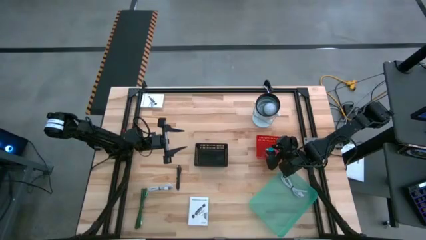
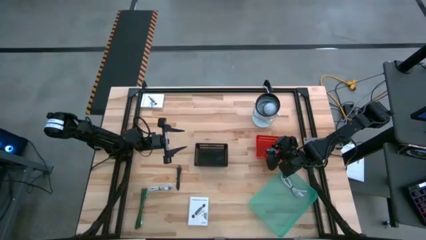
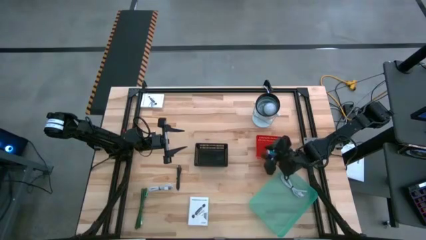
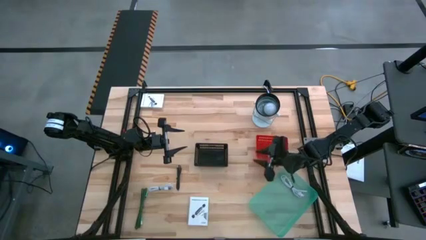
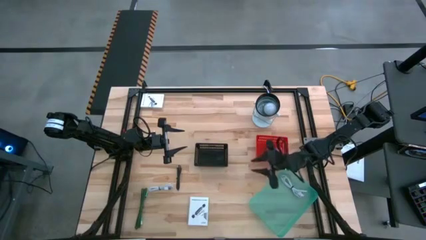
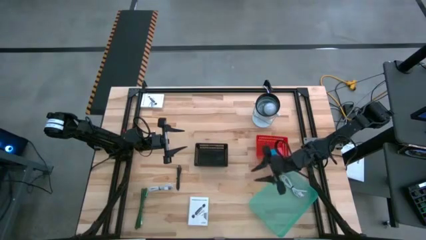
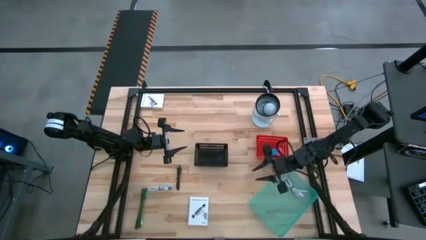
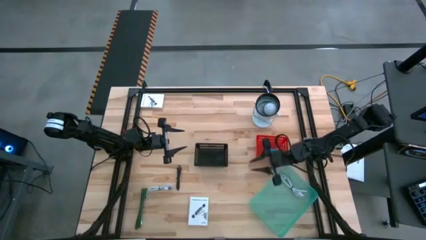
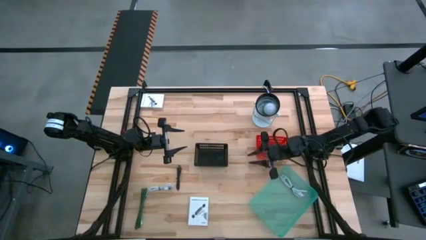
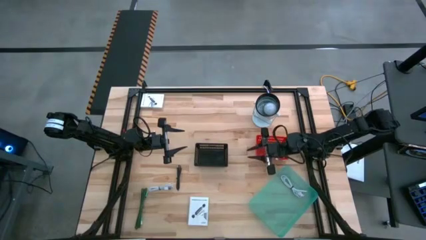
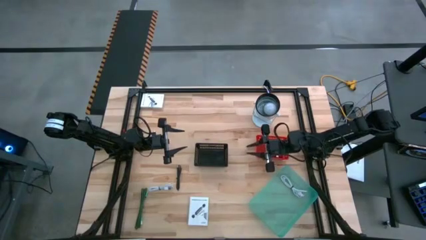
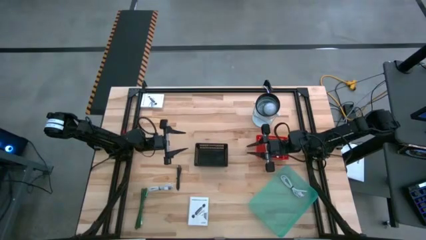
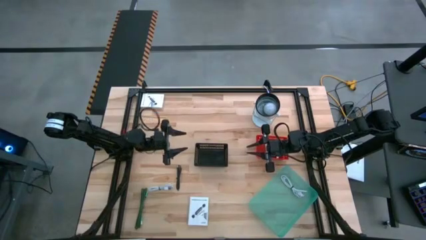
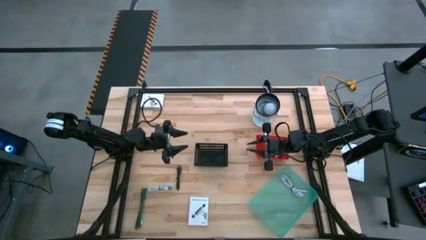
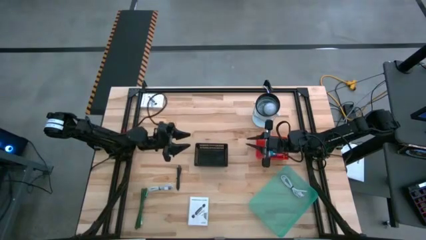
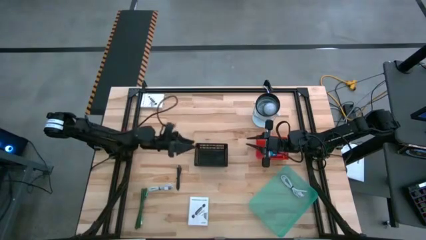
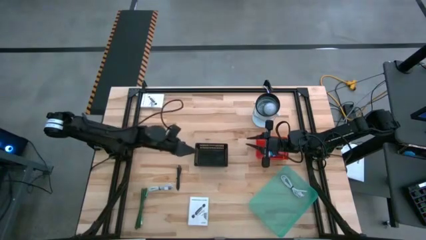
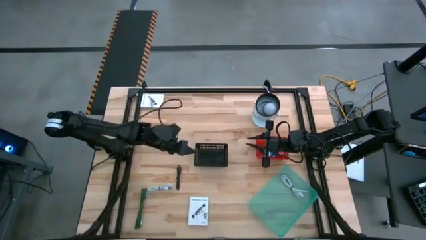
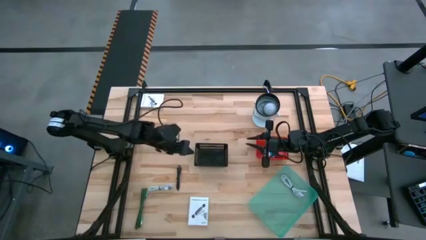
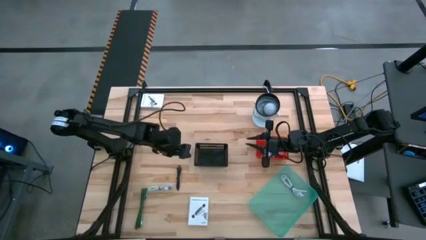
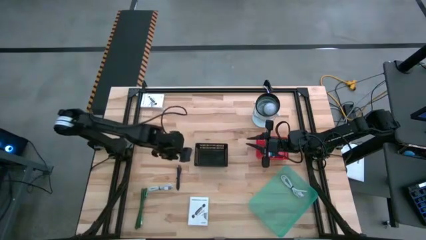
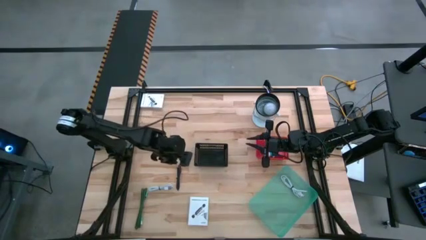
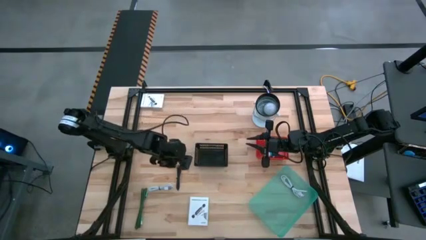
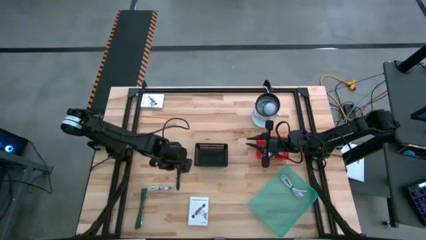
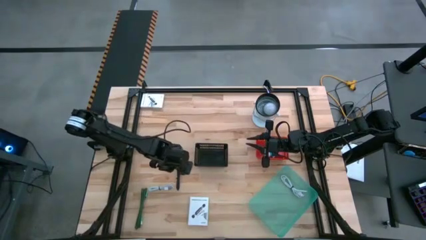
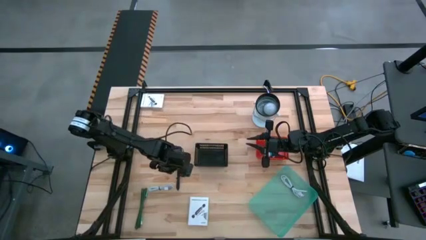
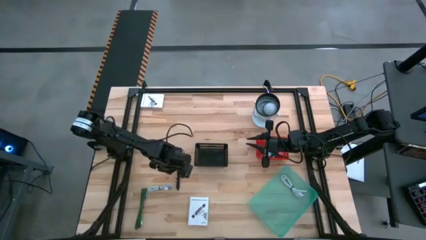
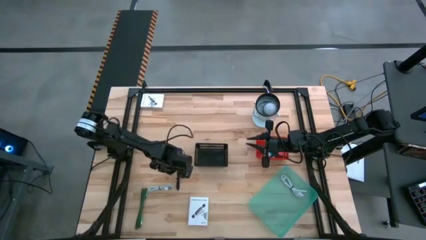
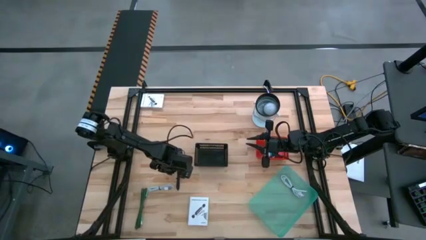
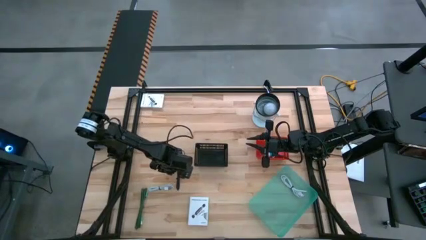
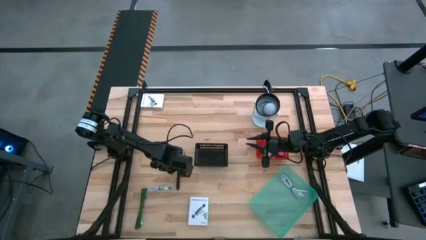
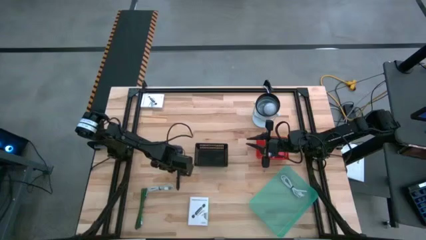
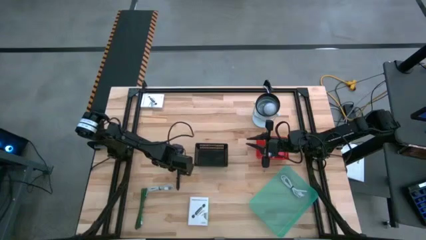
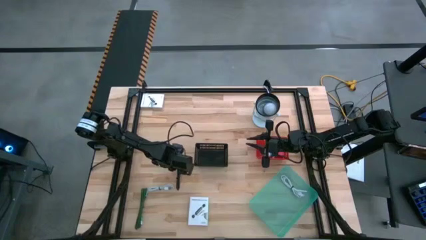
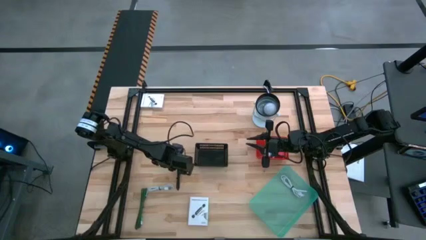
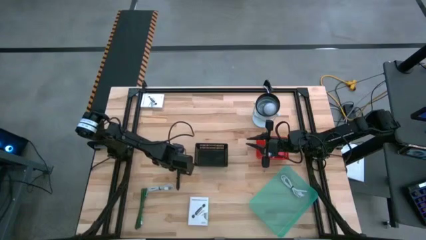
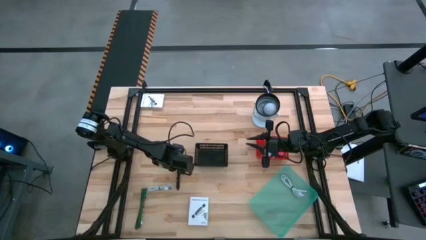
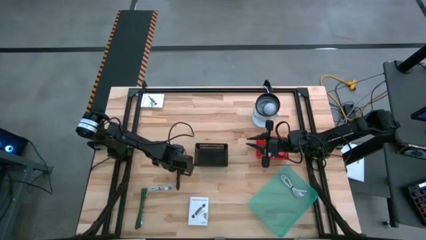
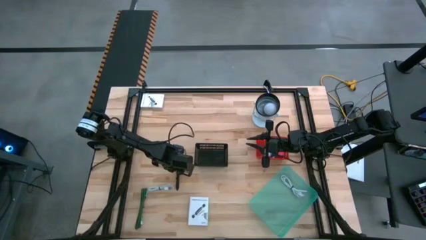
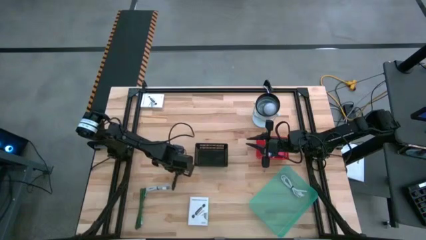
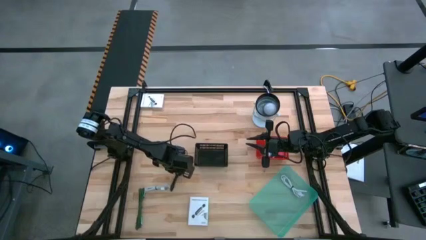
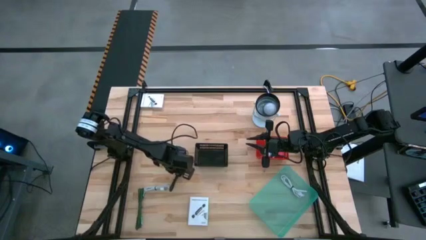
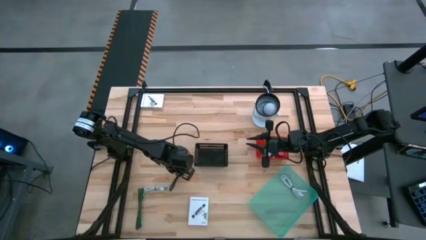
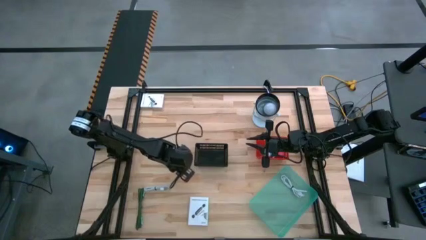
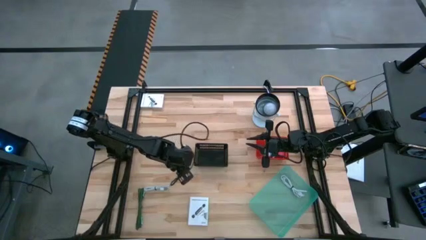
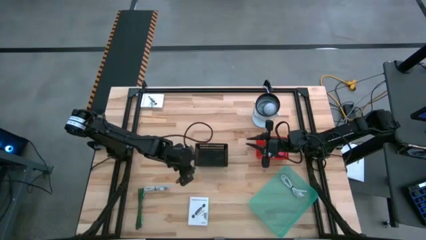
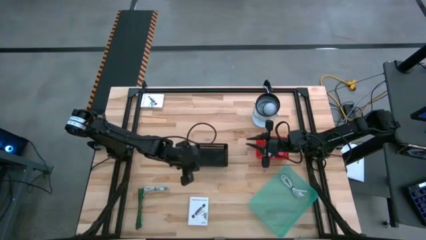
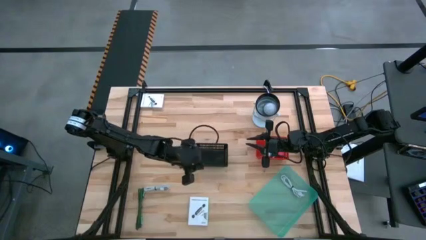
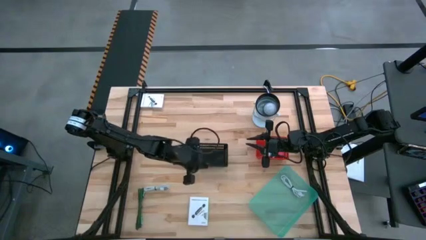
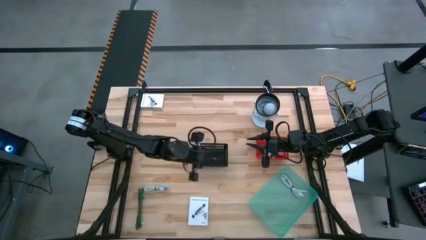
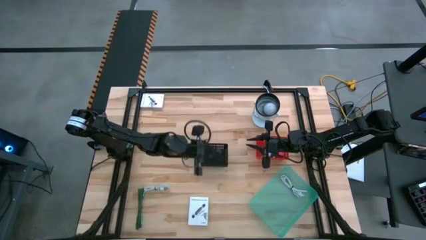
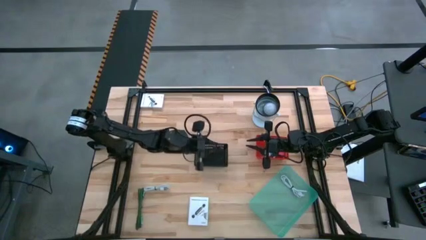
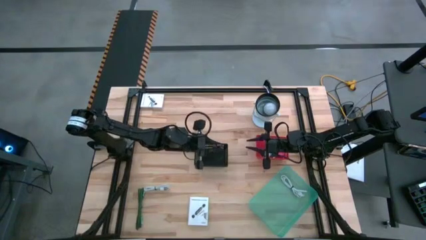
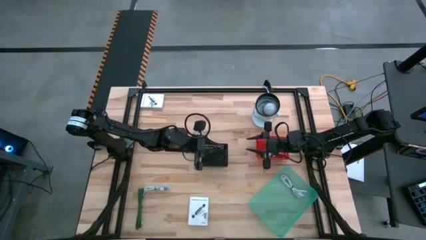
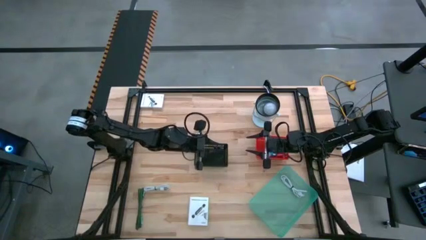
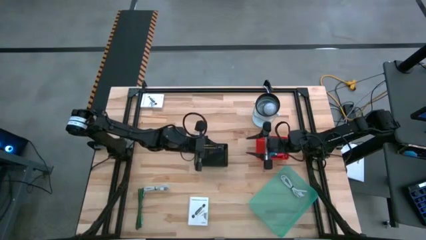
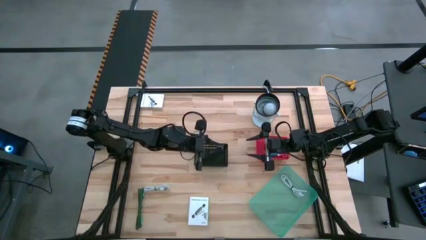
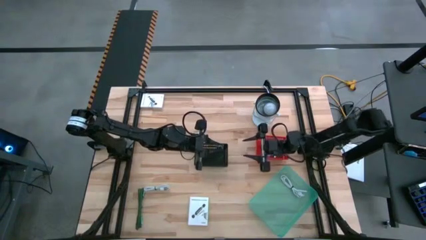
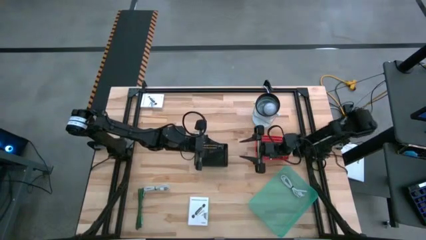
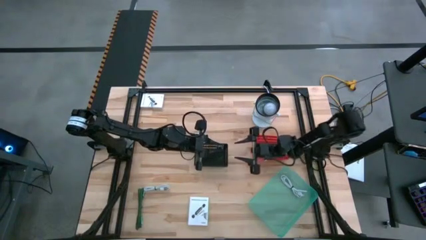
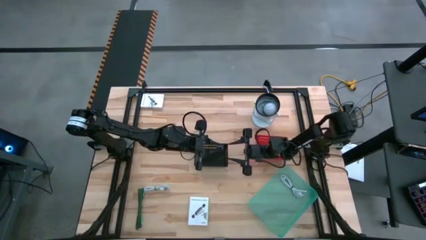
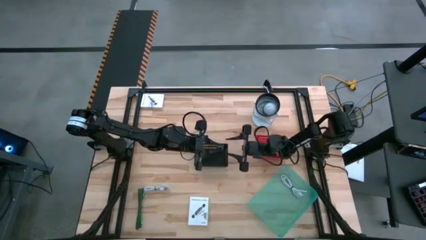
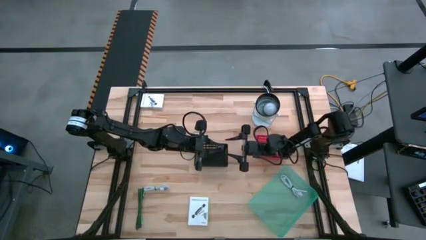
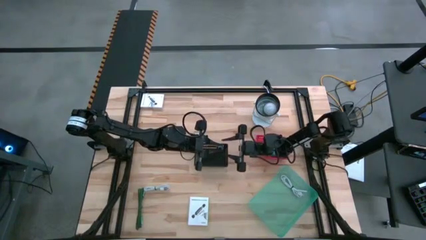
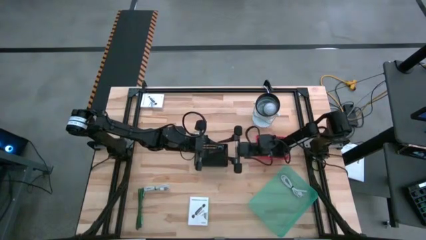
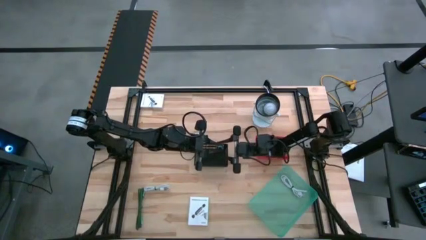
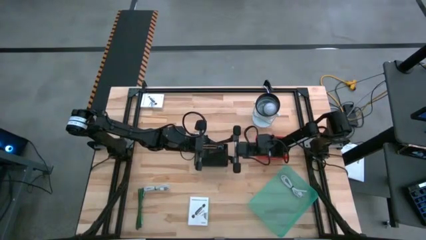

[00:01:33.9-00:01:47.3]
Task: Pick and place items into bin
Put the black charger cable into the blue bin

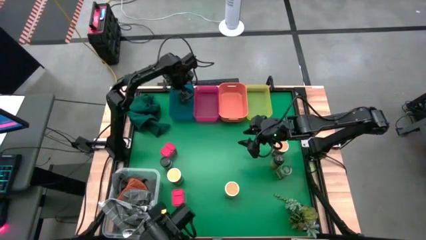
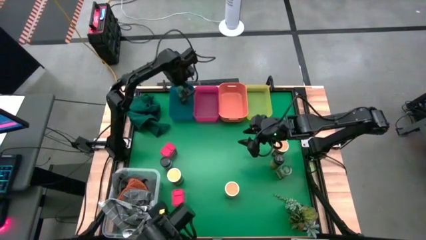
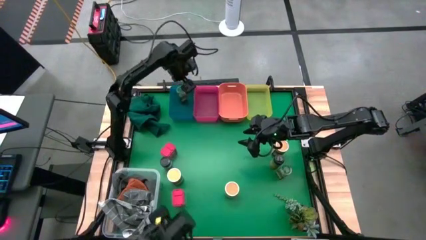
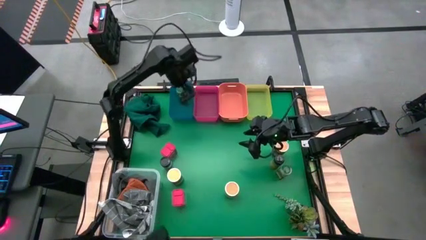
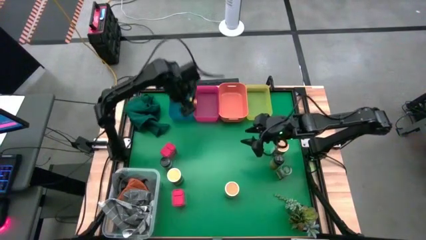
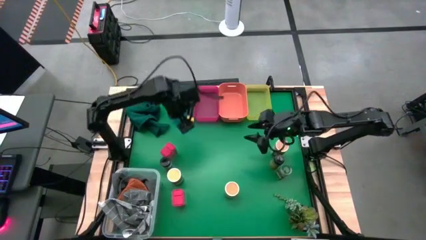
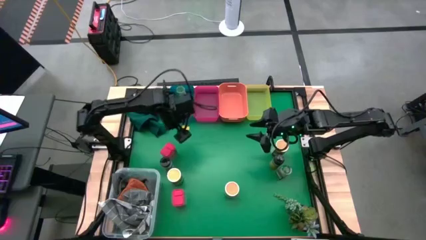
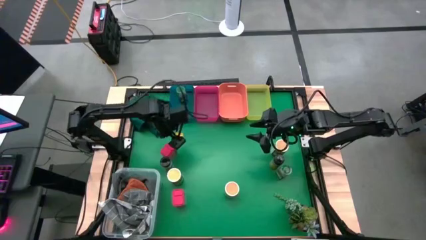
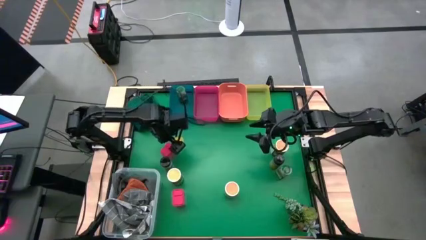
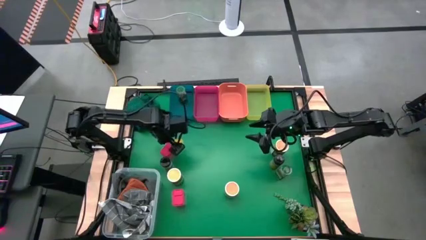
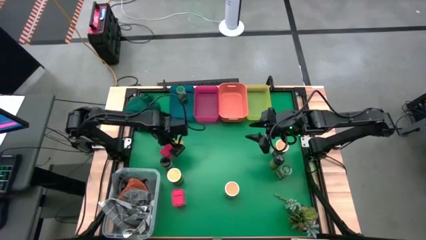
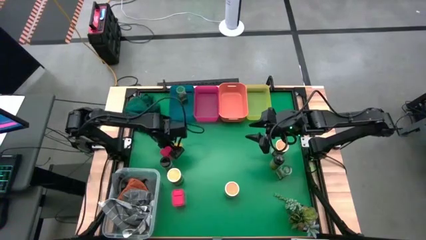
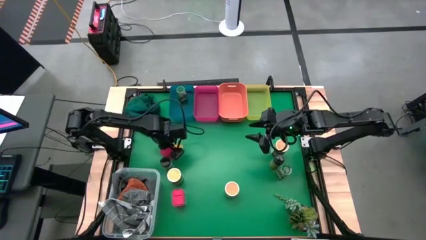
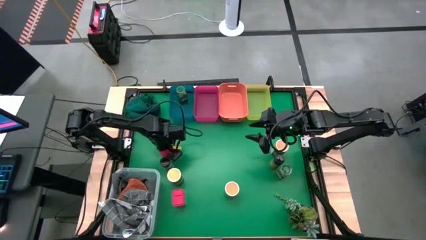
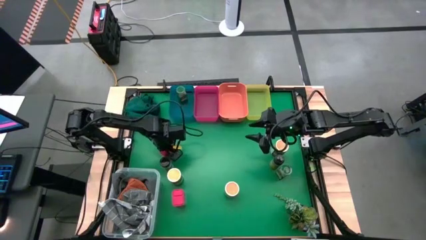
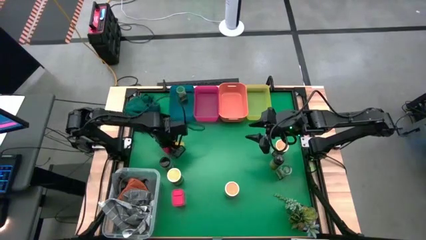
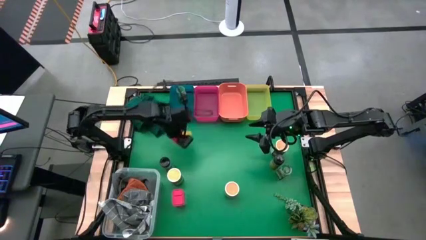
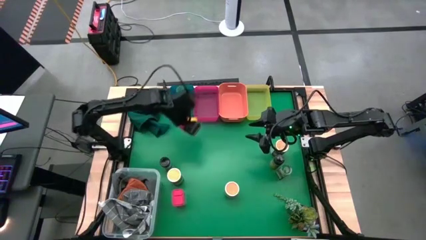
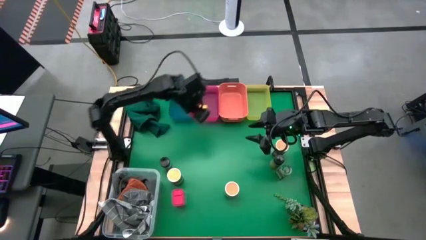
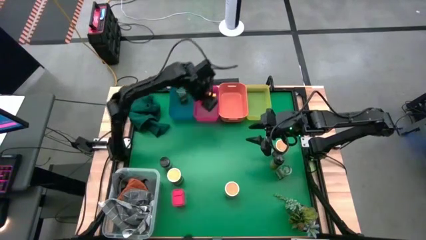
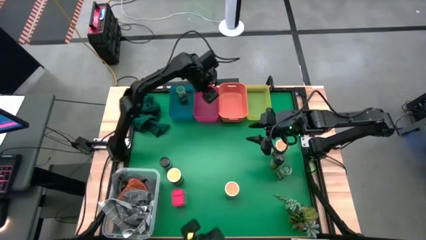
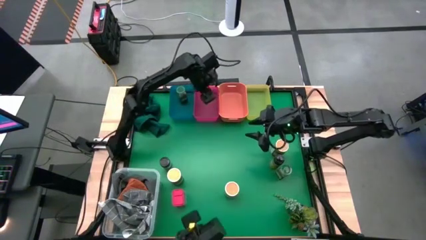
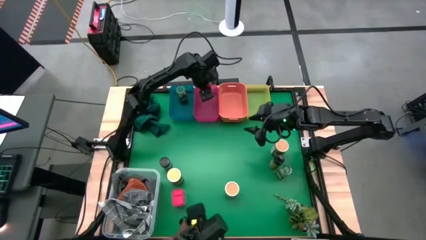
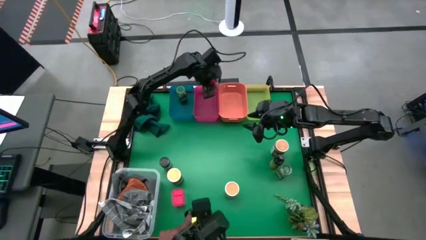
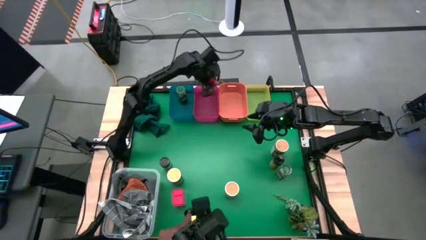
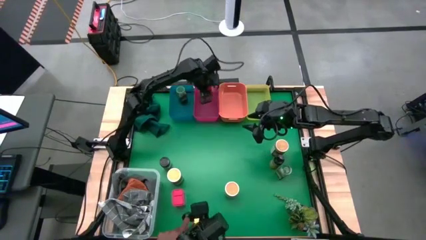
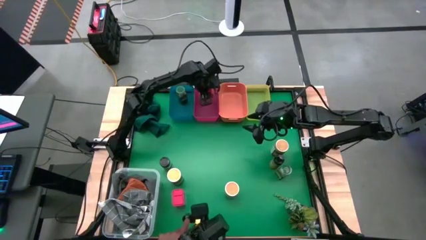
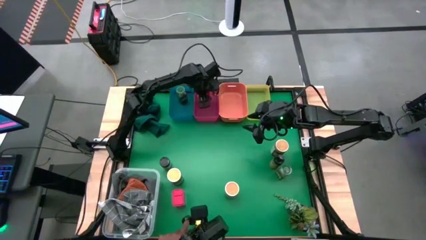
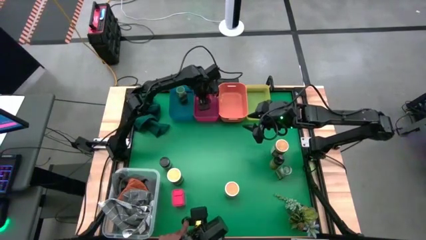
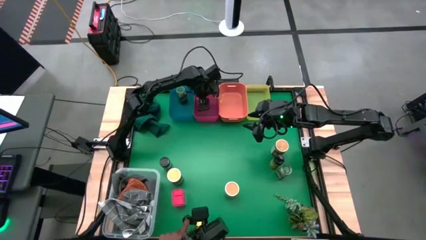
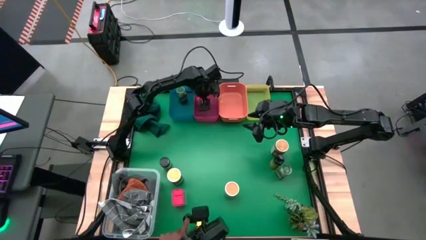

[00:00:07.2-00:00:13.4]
Task: Sort spices by type
Put the top red spice can into the pink bin
